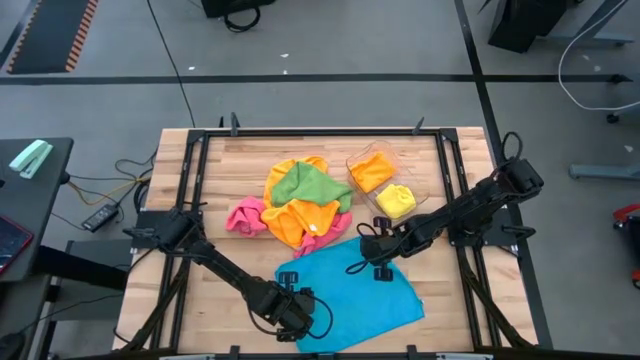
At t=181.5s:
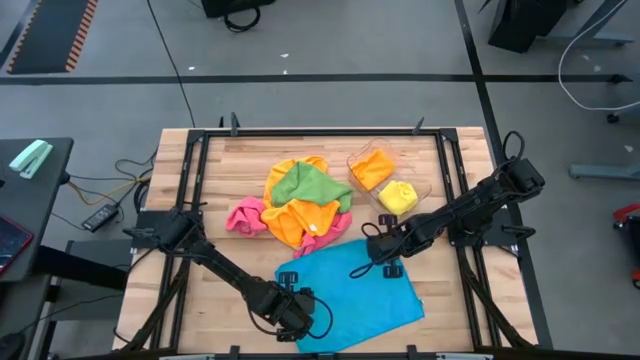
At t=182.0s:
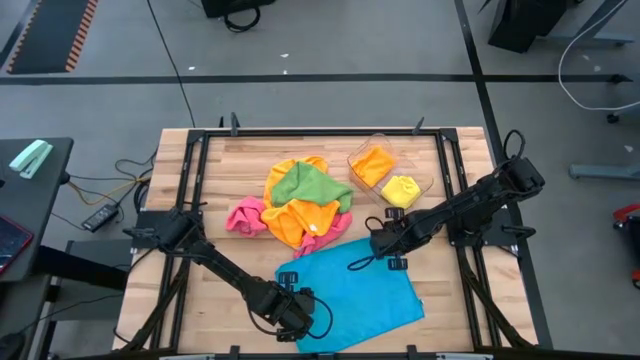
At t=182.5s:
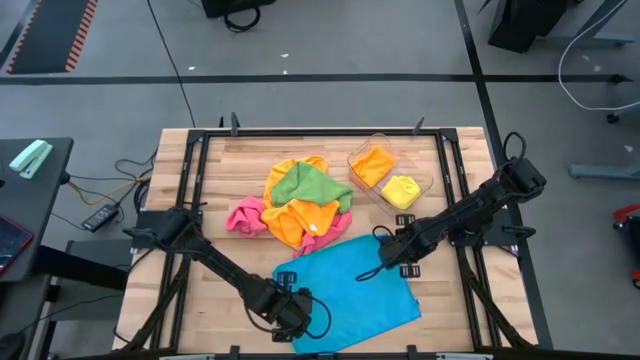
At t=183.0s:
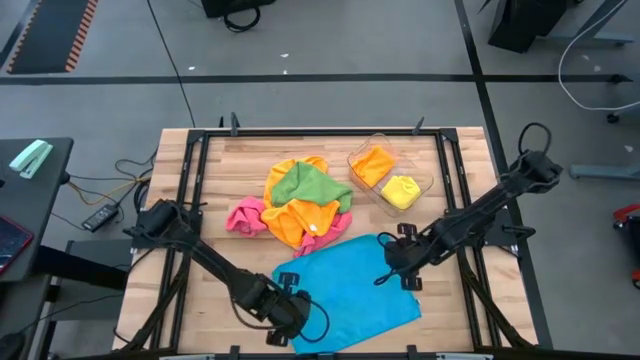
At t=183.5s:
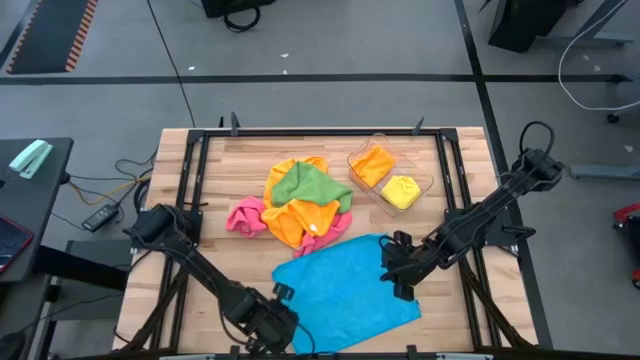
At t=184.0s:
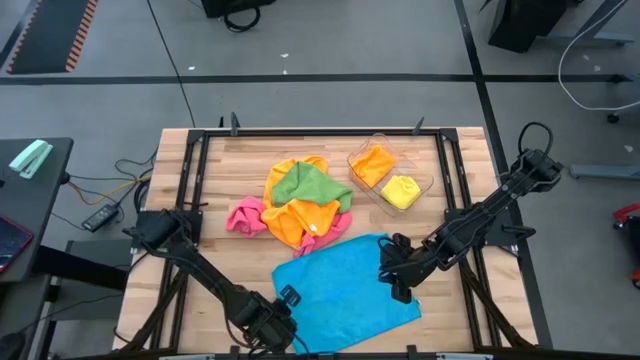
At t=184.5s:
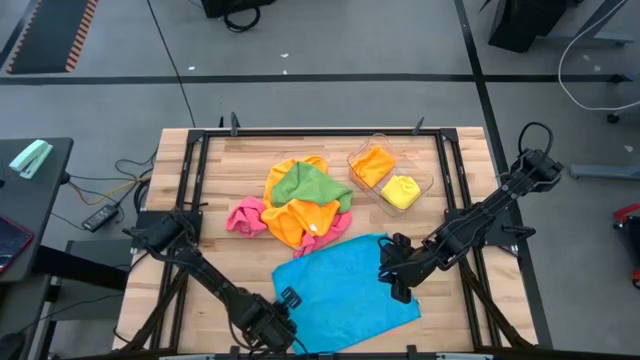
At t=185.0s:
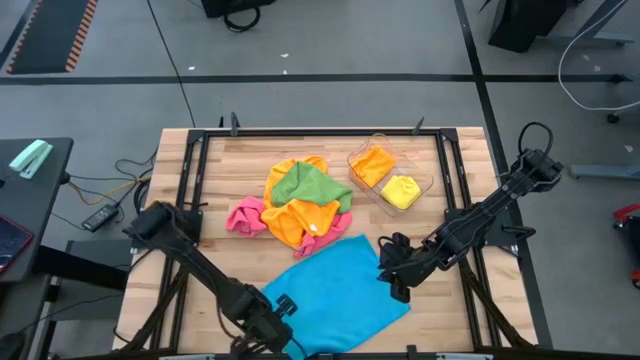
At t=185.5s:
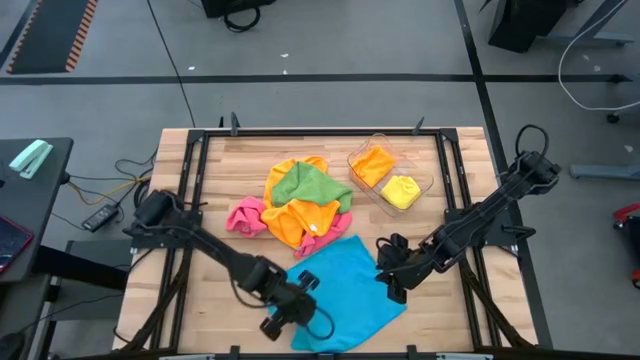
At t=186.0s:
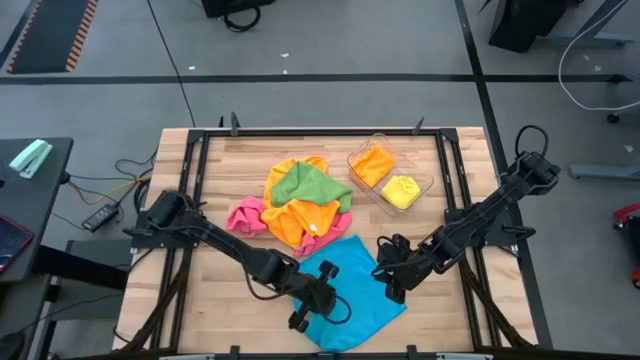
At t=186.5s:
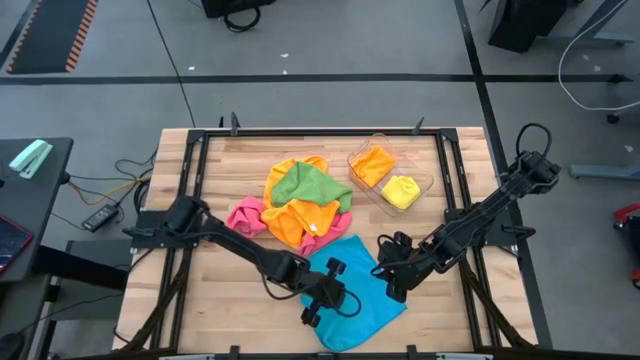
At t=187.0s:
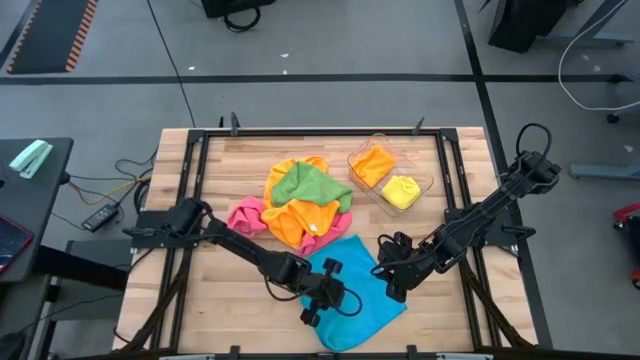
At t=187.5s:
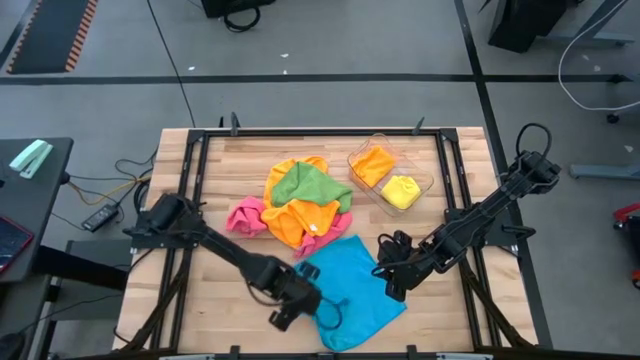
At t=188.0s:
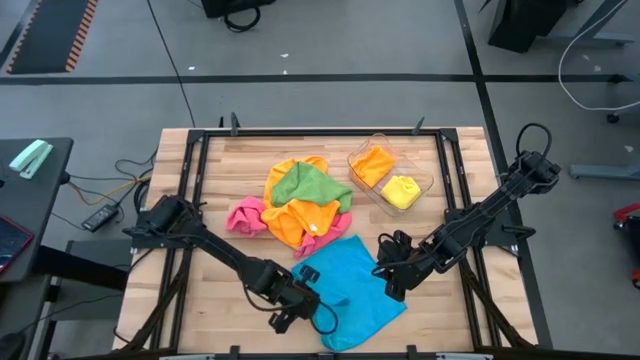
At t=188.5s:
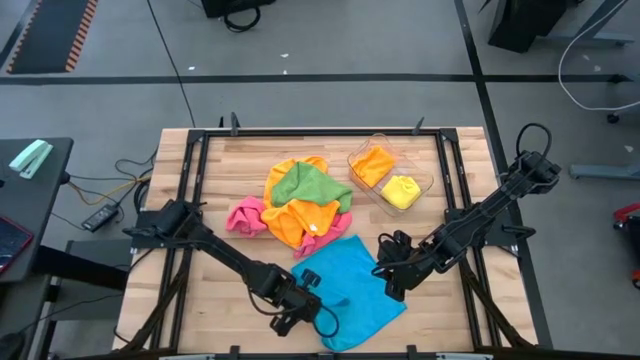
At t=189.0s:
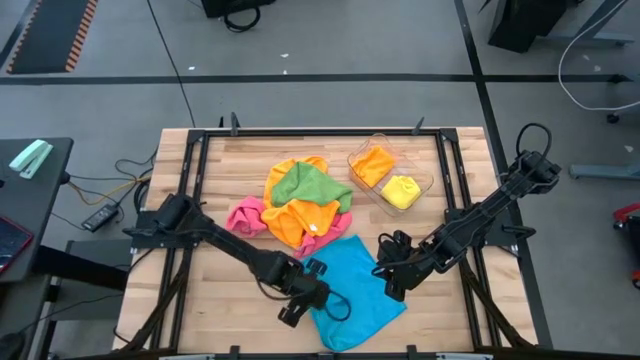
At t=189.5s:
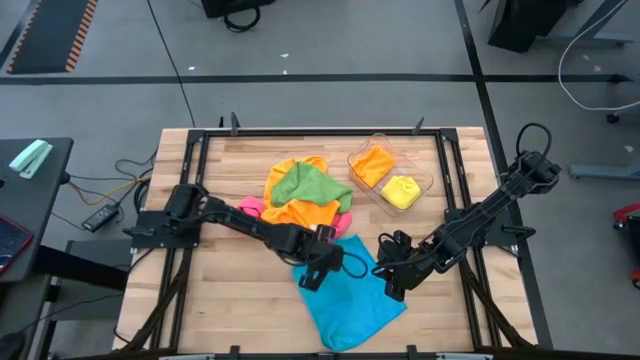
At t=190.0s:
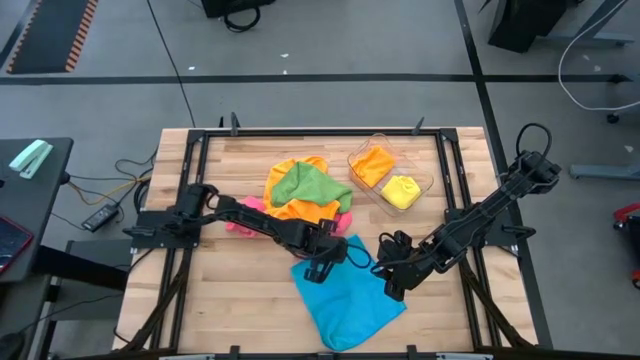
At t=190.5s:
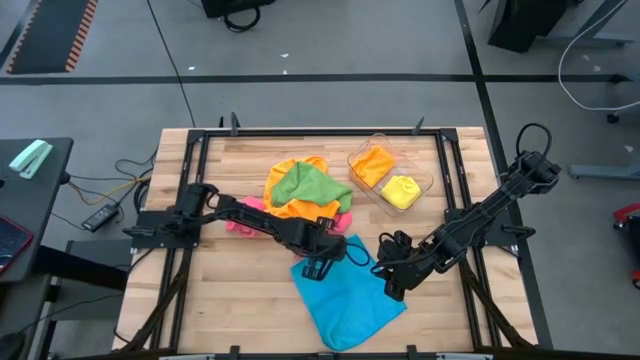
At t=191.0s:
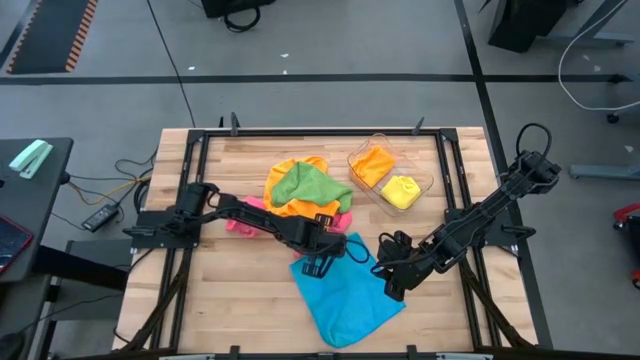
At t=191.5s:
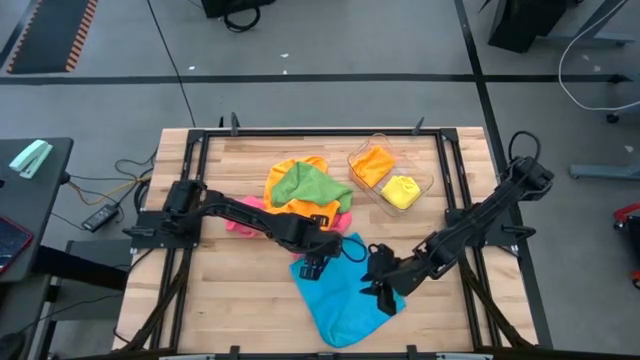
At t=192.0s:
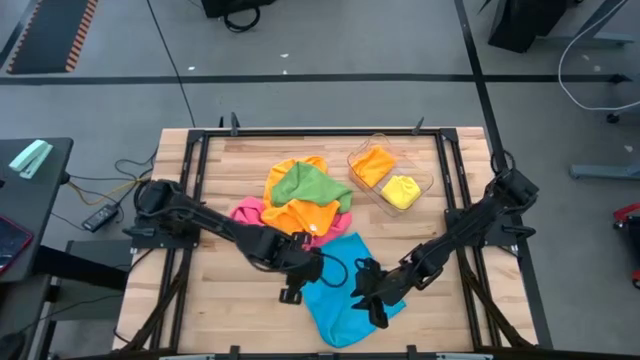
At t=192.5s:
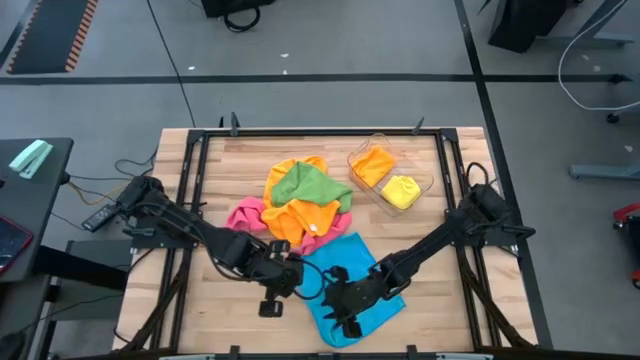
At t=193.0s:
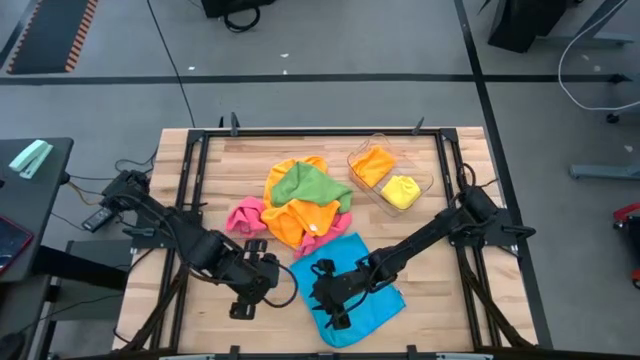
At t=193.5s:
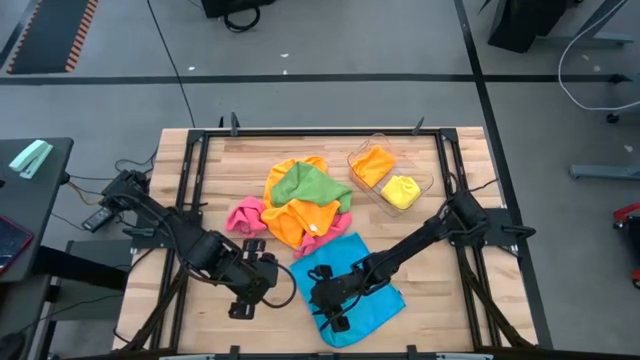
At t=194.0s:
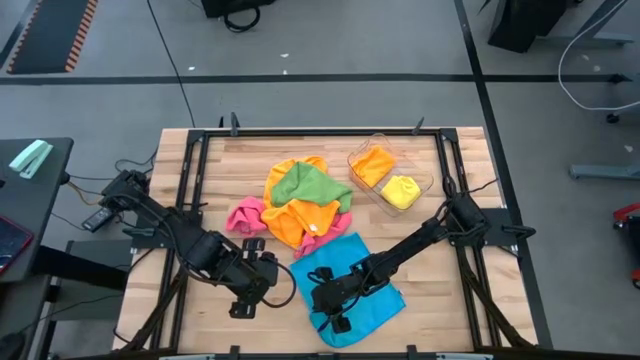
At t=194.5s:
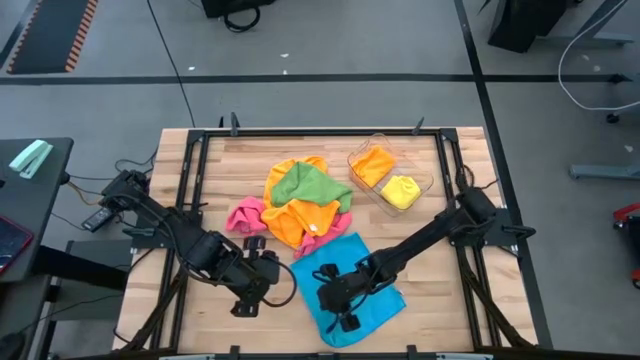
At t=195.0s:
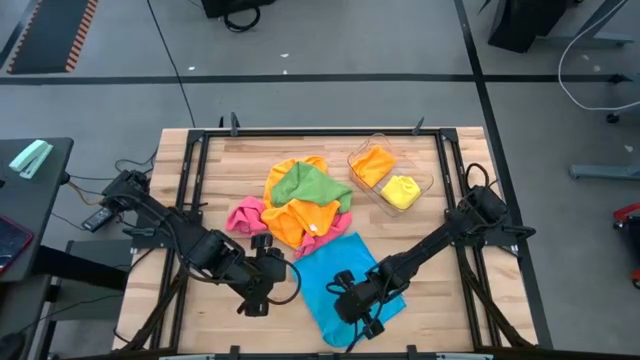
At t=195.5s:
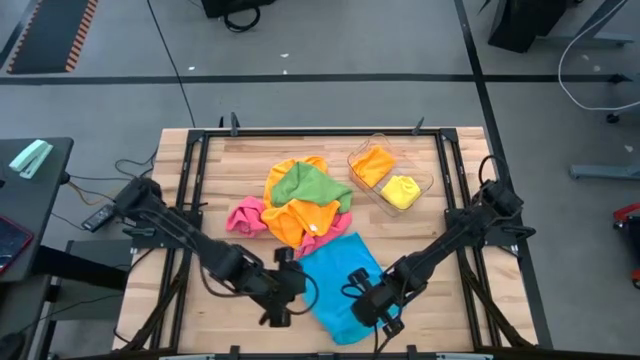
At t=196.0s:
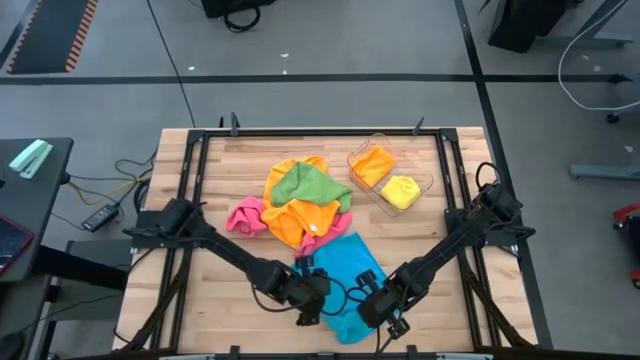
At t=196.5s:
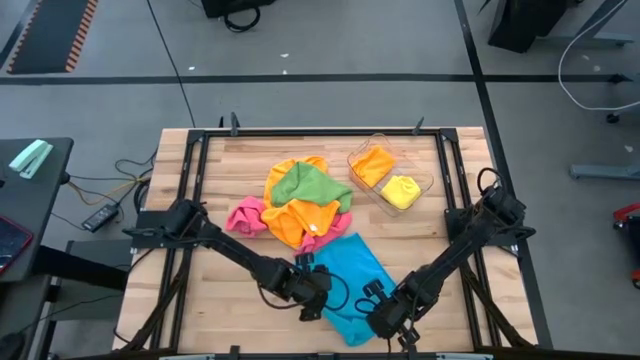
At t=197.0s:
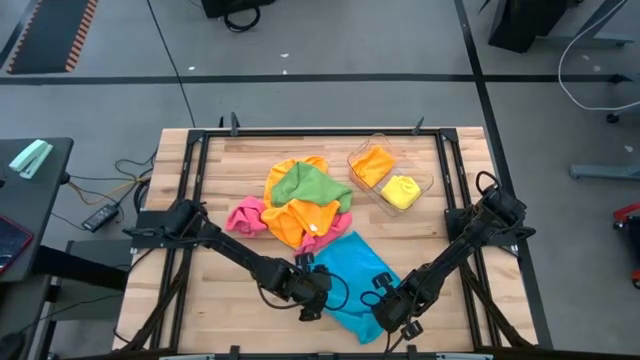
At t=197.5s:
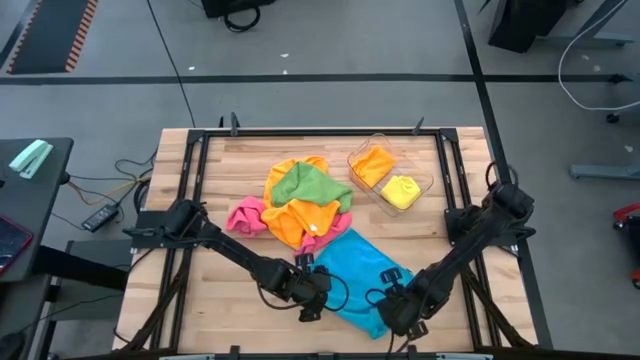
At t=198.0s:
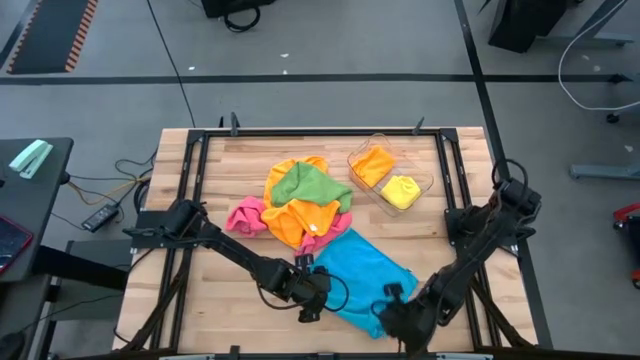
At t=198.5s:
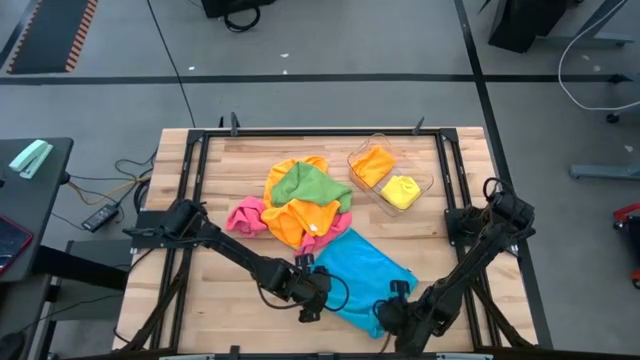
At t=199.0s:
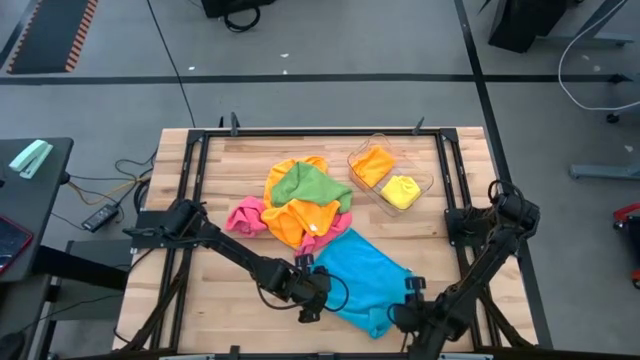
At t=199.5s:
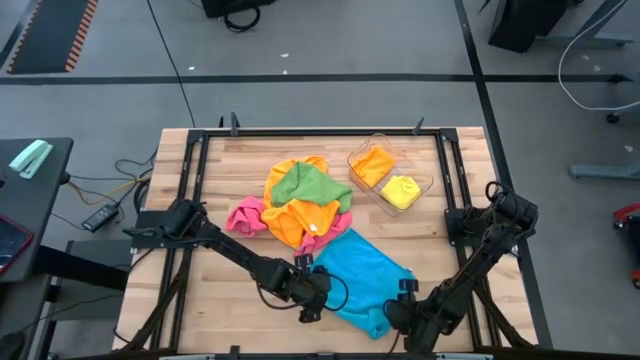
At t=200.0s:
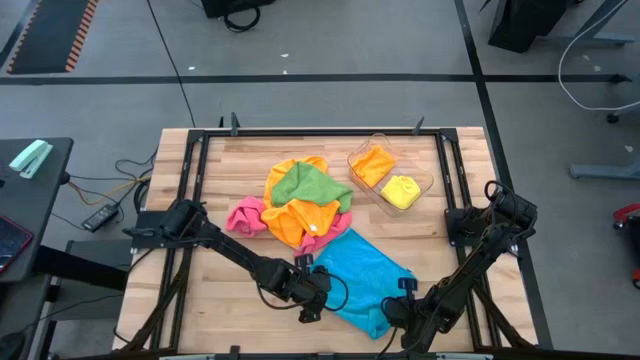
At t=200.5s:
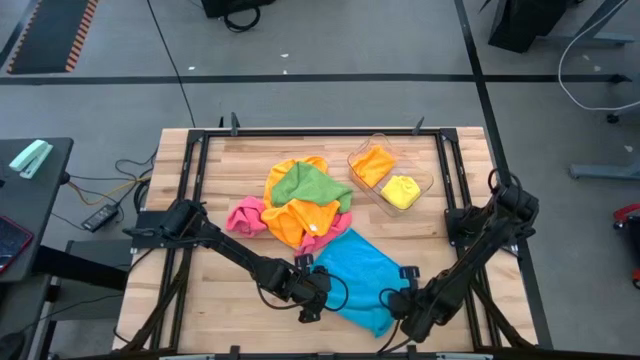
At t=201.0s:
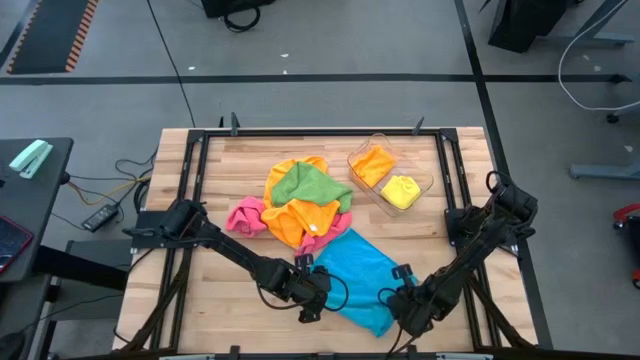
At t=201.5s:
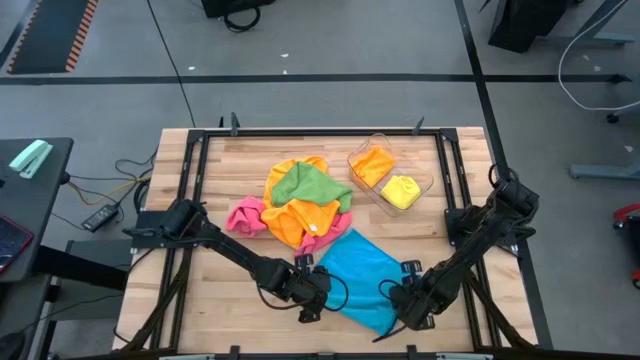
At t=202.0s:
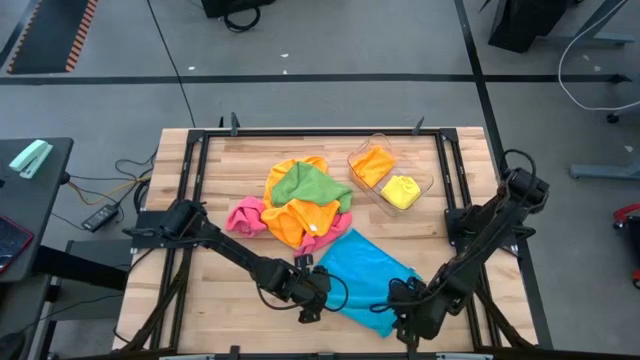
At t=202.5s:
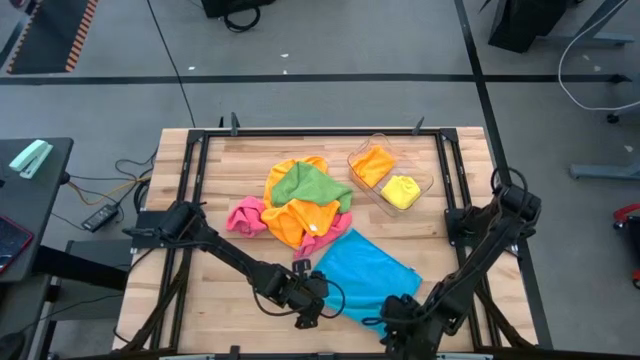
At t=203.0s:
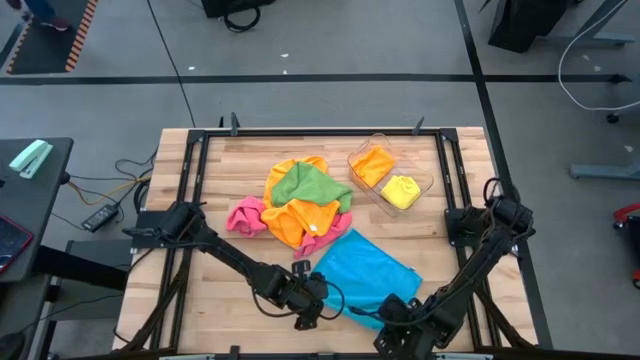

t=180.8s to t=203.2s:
Task: Fold microfiber towels
Fold the blue towel
